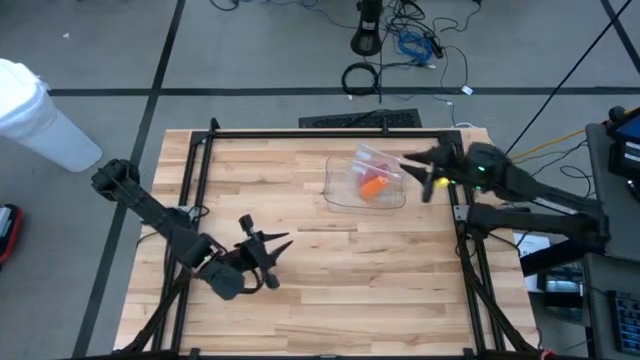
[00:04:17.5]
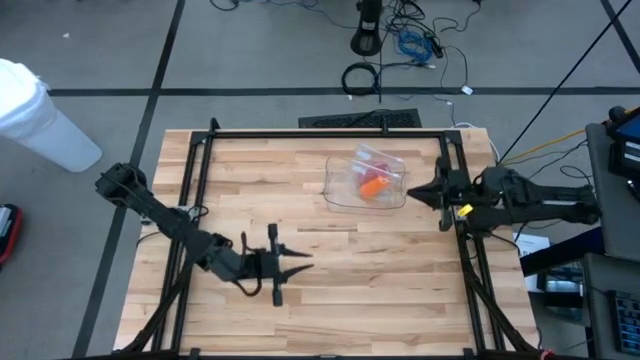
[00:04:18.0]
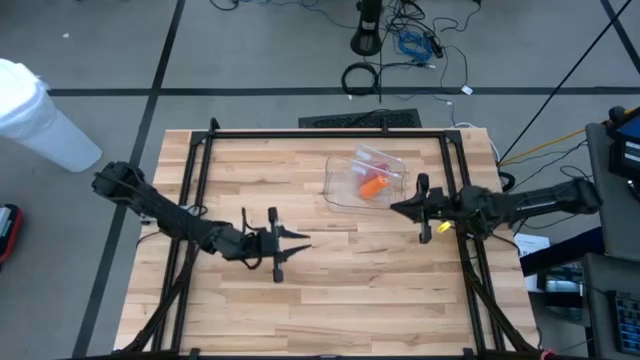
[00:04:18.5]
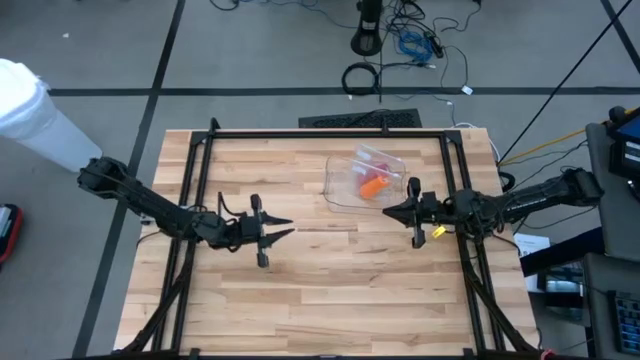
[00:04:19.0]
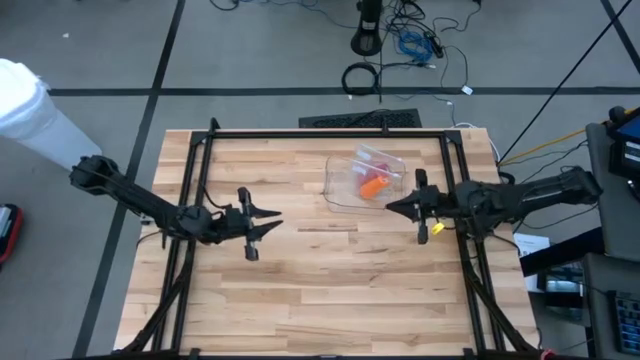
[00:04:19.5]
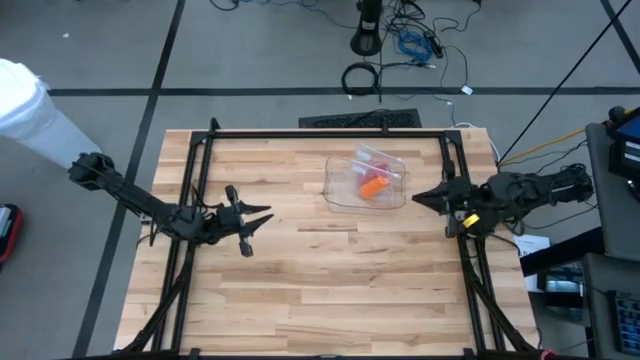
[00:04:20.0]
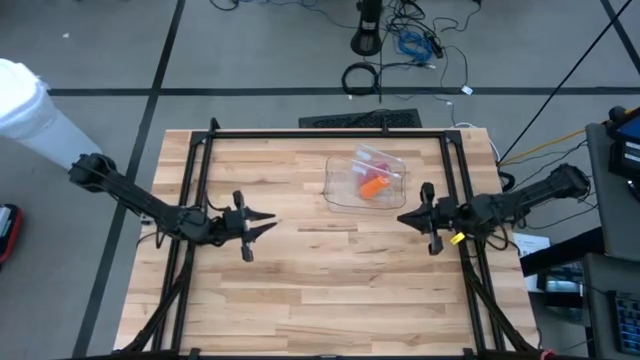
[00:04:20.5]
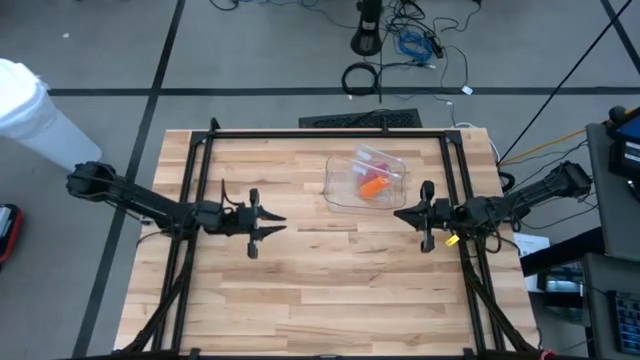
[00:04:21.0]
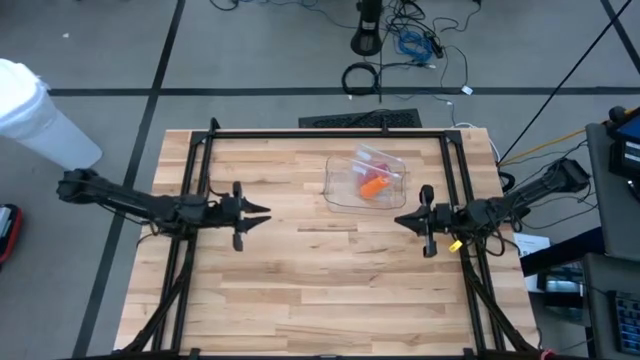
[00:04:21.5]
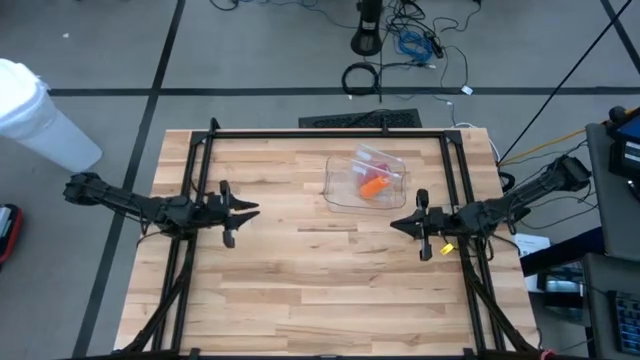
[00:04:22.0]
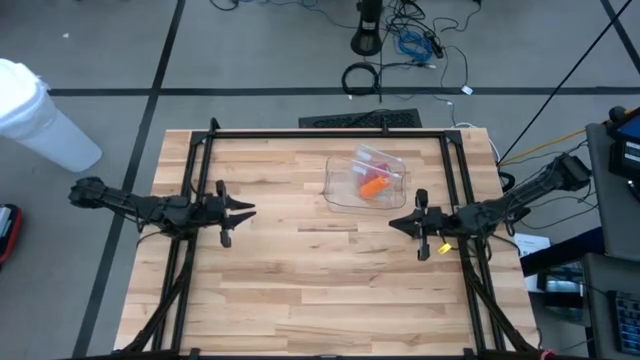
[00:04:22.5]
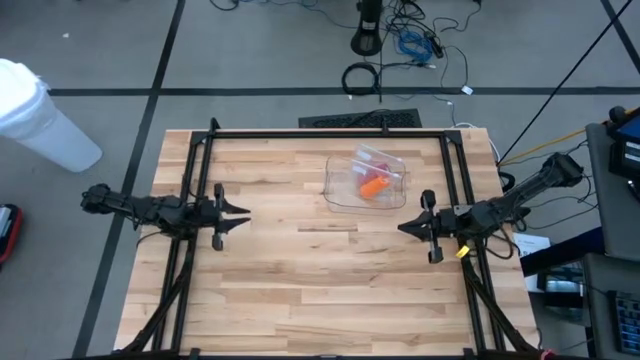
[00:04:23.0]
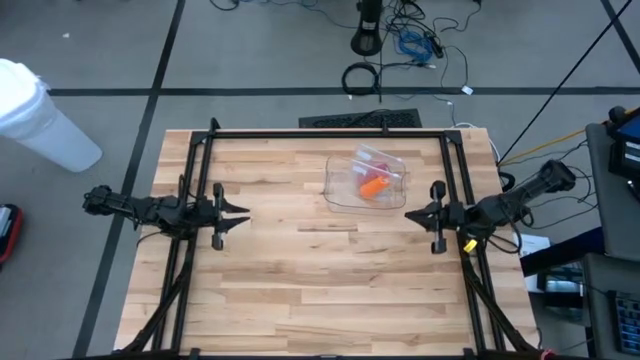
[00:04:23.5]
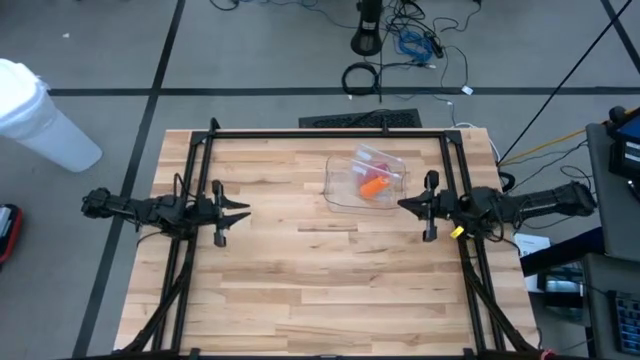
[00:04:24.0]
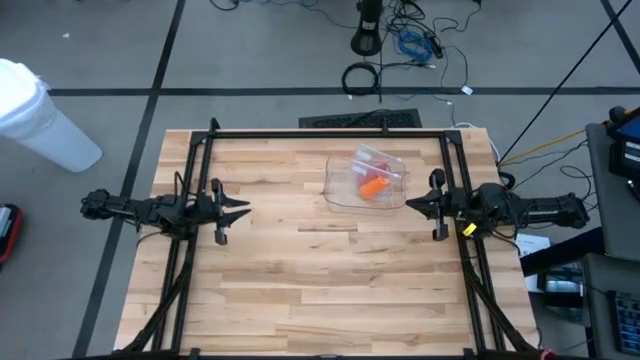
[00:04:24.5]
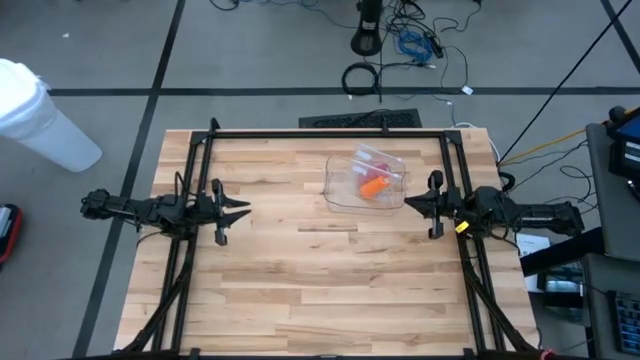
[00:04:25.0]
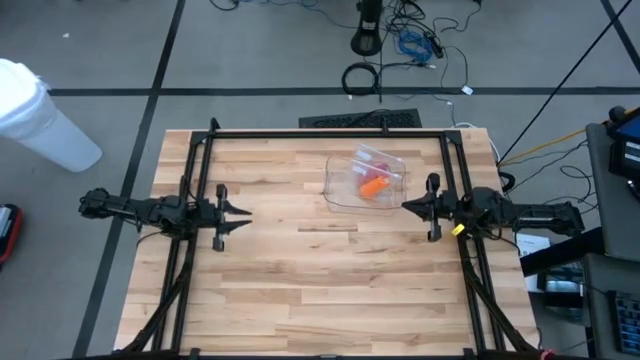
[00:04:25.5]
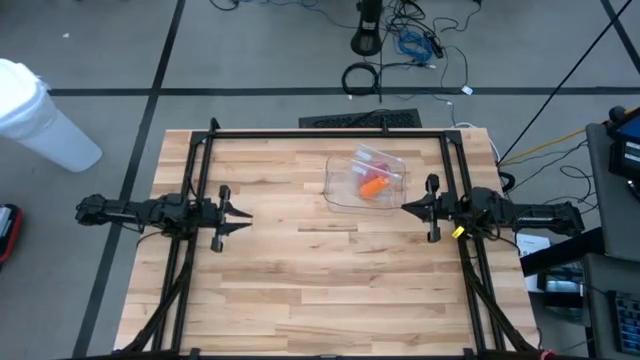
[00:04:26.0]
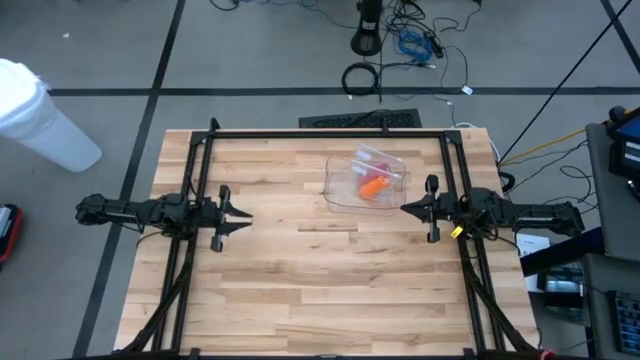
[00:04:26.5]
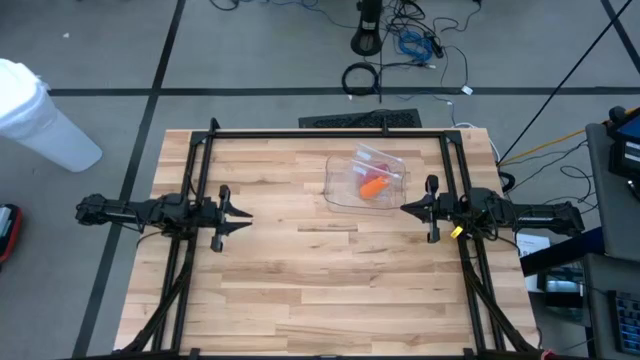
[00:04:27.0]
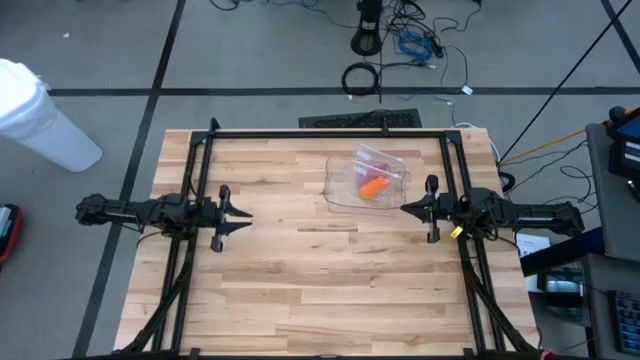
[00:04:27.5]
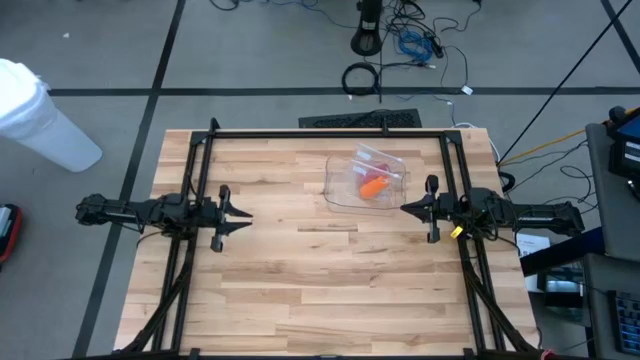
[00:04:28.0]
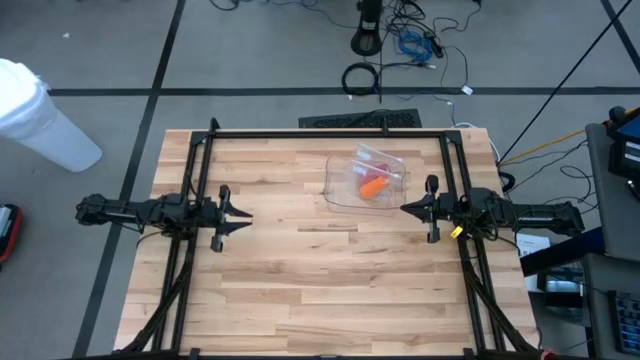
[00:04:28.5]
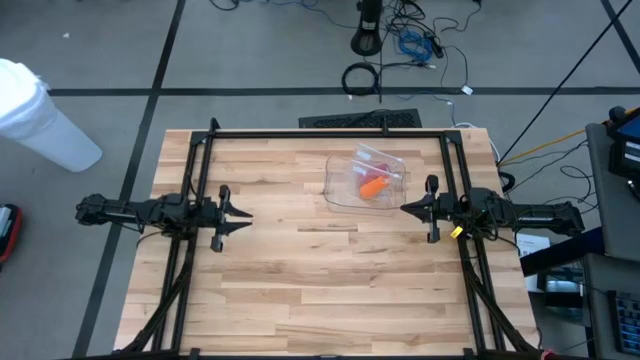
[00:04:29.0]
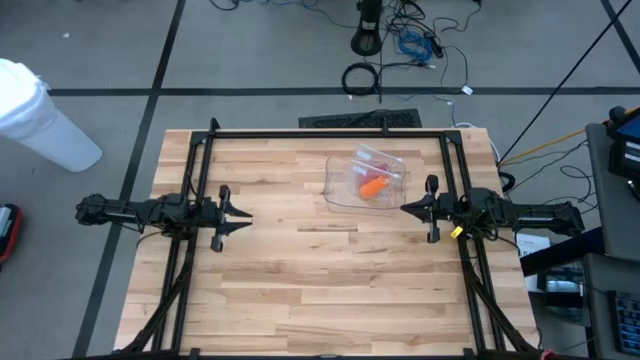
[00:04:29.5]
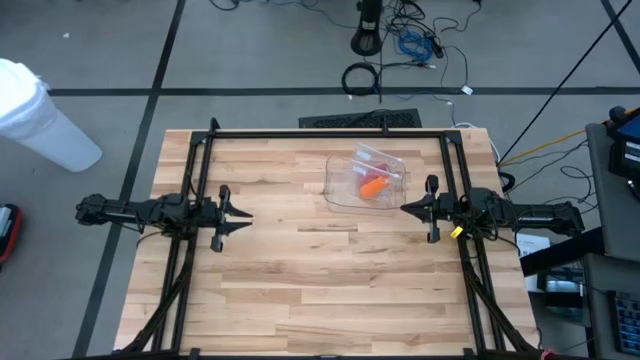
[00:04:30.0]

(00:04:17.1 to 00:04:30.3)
Task: Roll bandage
Return to Home Position

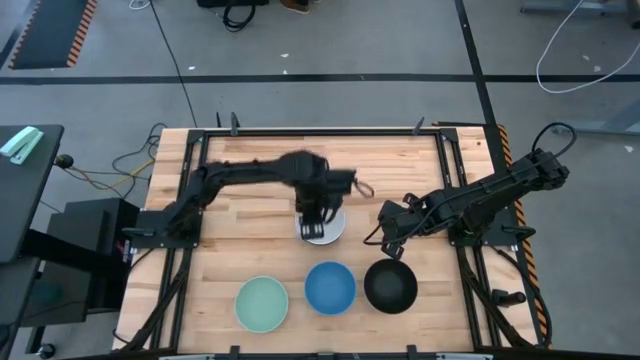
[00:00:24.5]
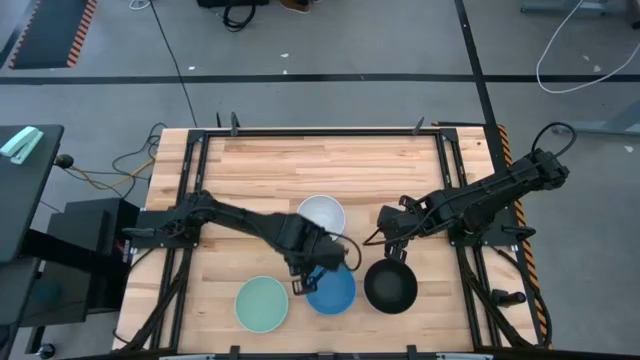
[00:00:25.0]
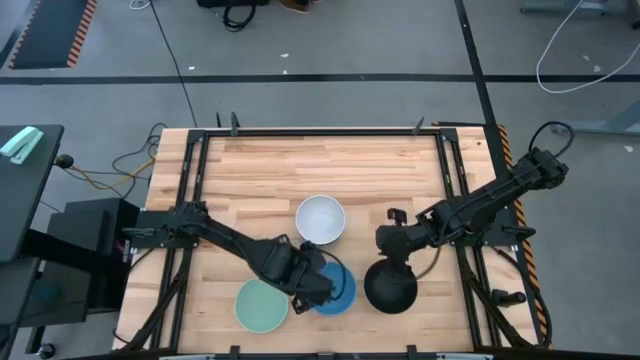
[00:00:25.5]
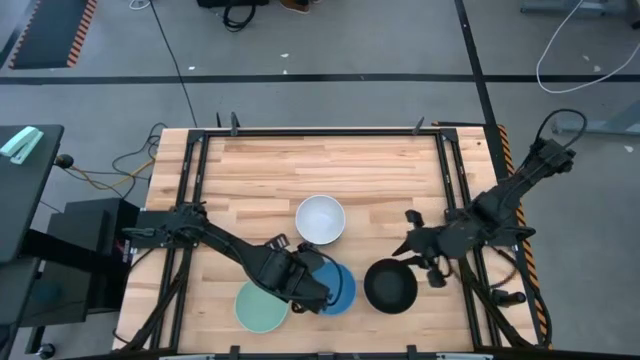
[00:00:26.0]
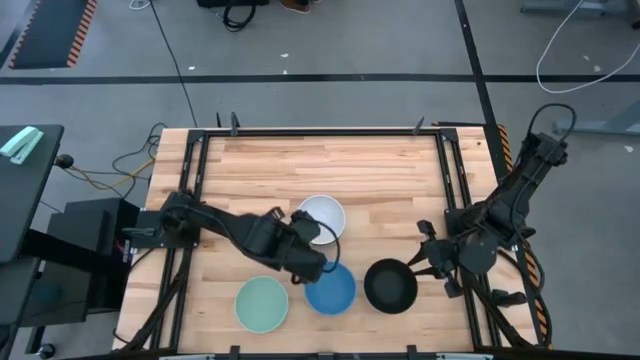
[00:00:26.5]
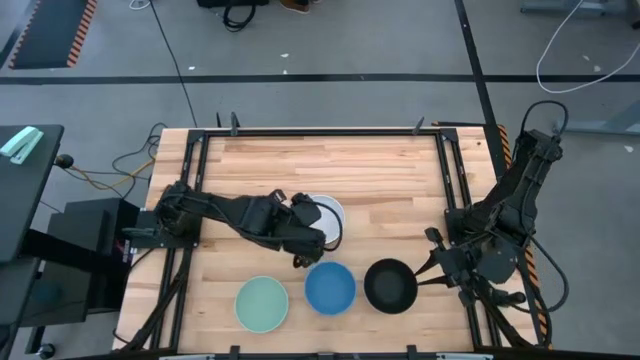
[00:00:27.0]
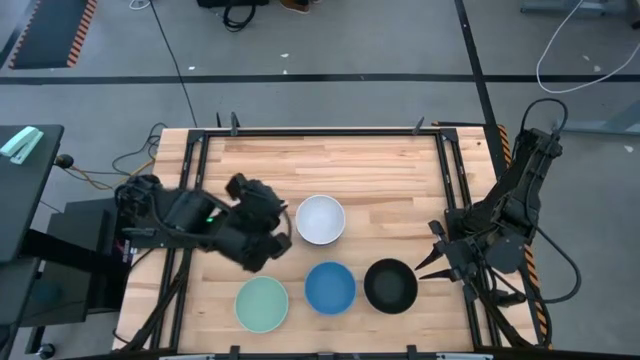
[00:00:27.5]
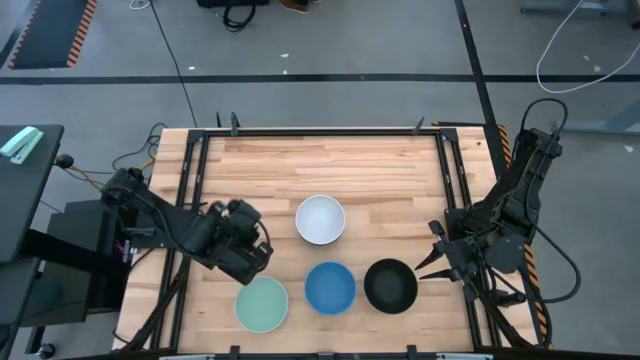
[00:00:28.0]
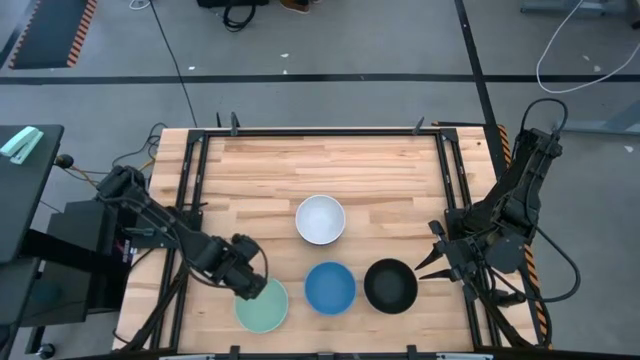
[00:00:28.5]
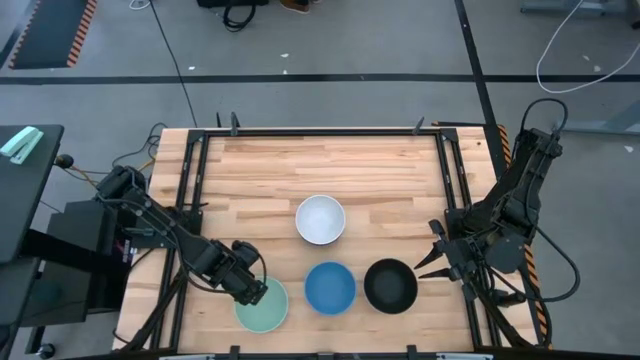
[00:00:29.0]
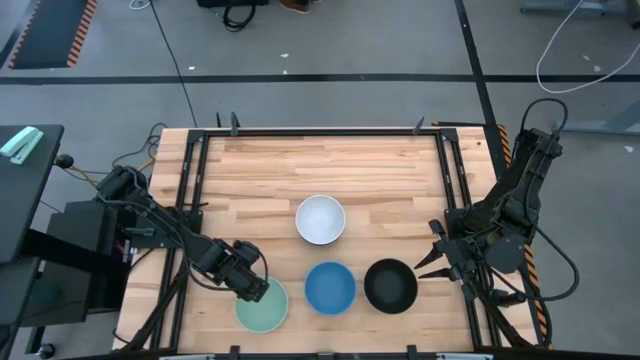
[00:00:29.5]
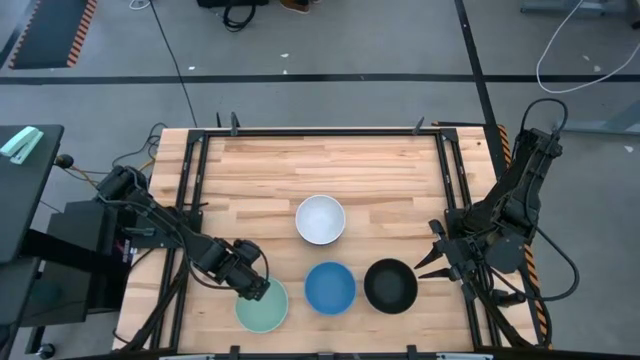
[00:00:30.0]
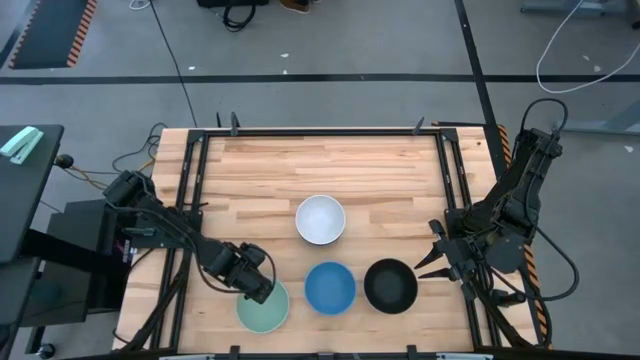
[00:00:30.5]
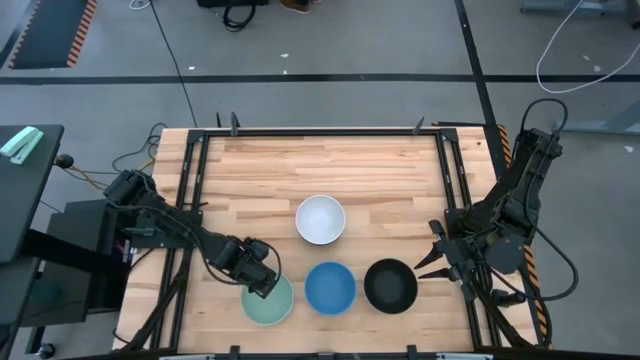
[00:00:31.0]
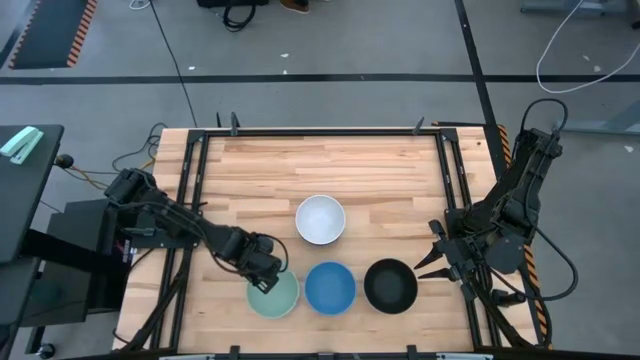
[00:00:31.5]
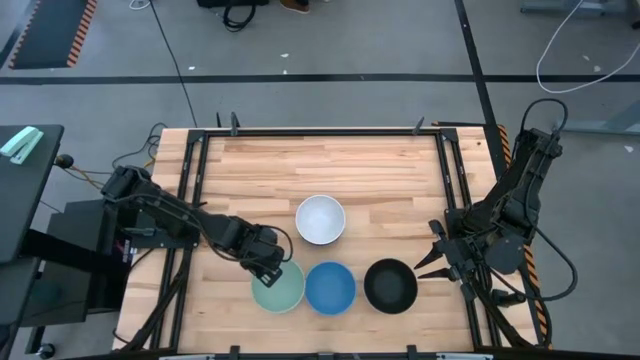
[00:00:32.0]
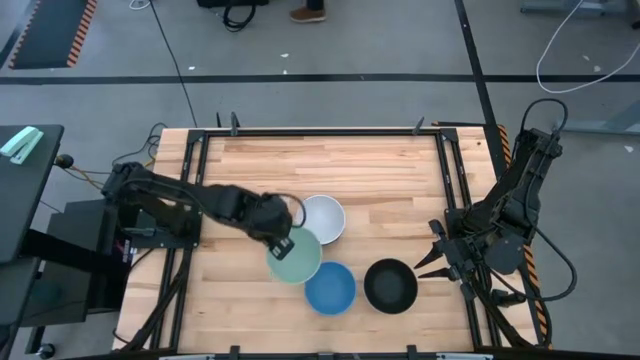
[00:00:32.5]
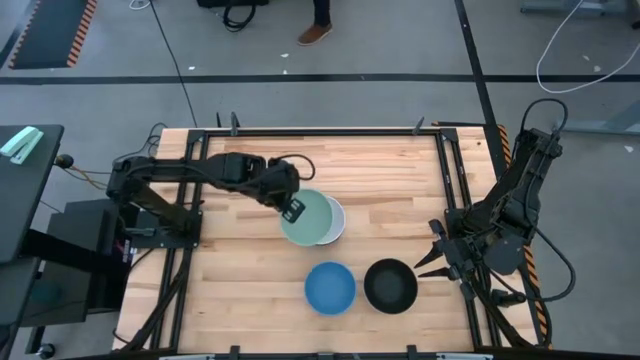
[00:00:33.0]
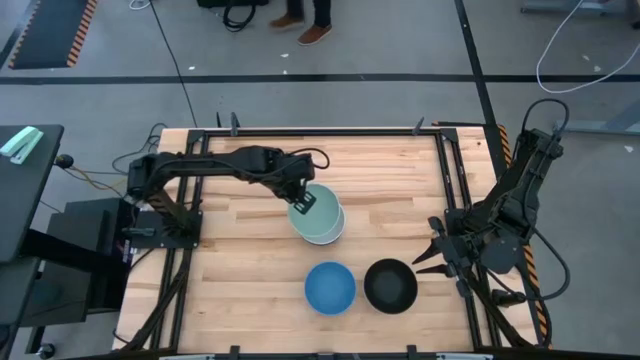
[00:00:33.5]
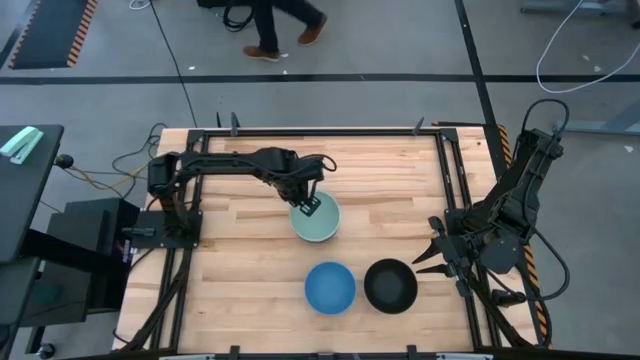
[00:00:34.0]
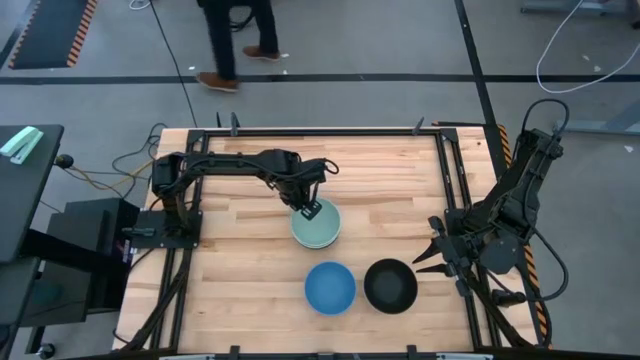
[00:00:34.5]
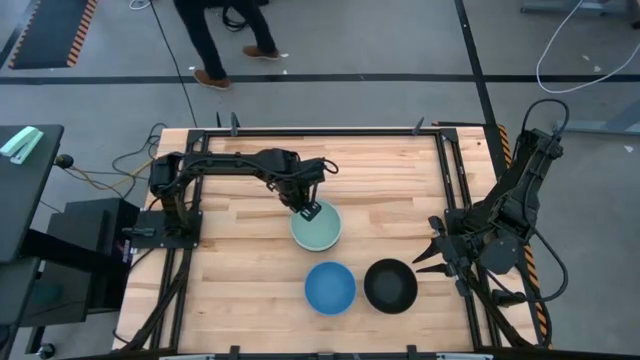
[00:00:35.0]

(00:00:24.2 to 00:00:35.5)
Task: Nest bowls inside each other
Stack the green bowl on the white bowl
